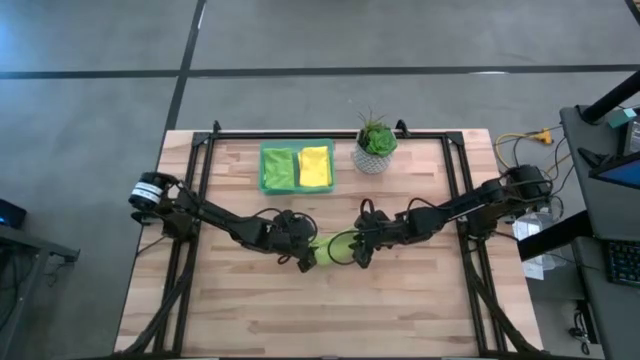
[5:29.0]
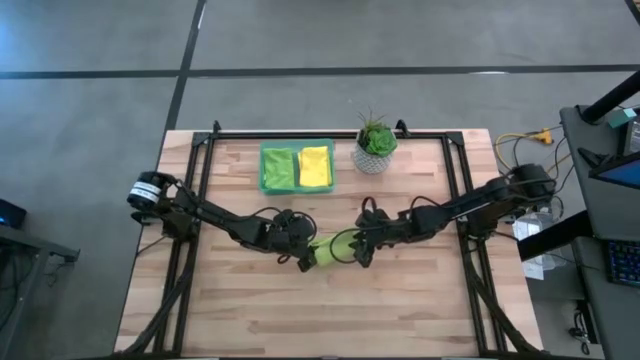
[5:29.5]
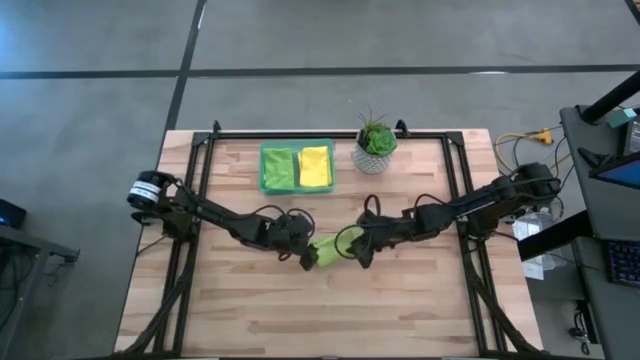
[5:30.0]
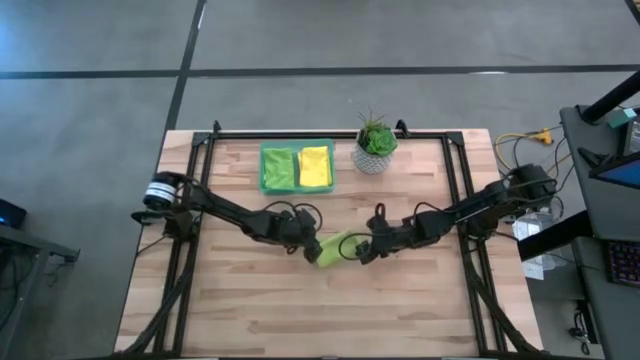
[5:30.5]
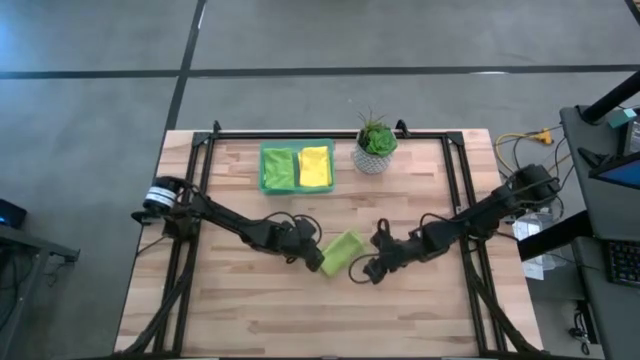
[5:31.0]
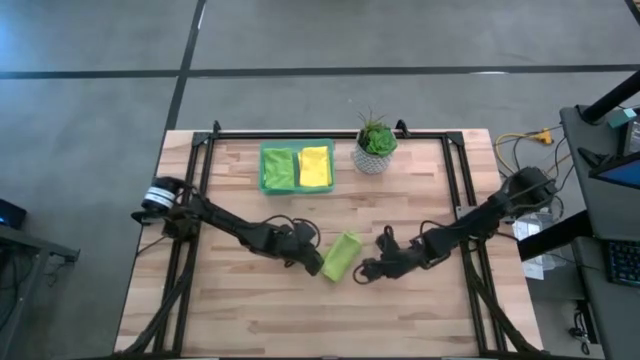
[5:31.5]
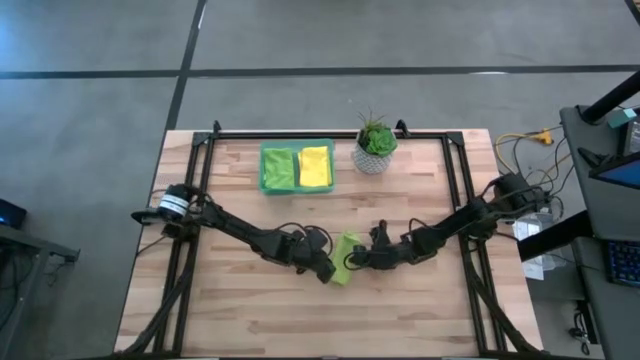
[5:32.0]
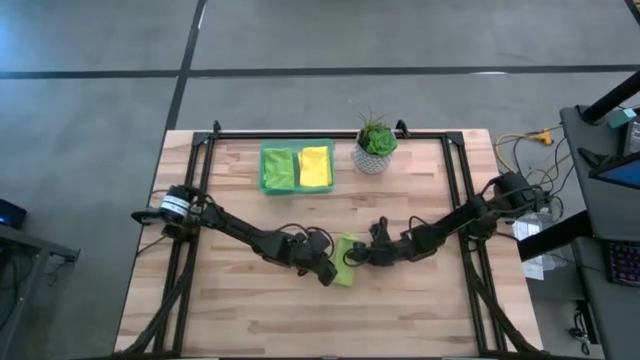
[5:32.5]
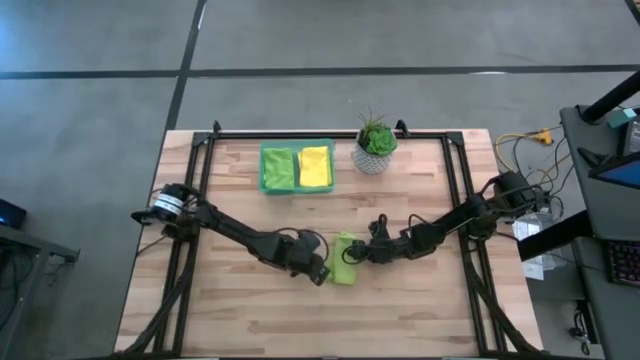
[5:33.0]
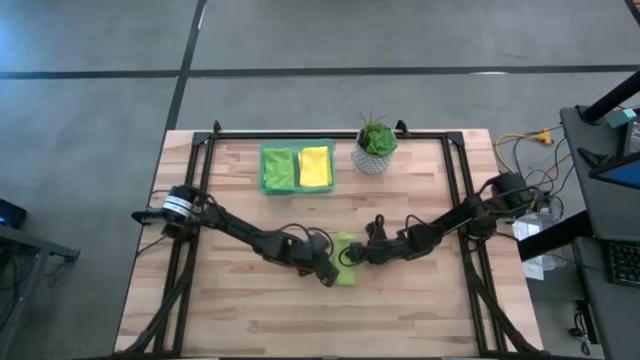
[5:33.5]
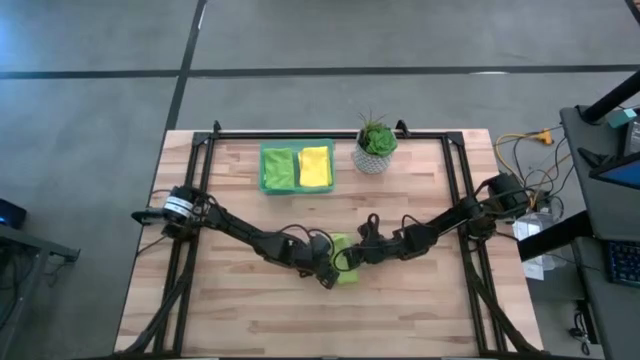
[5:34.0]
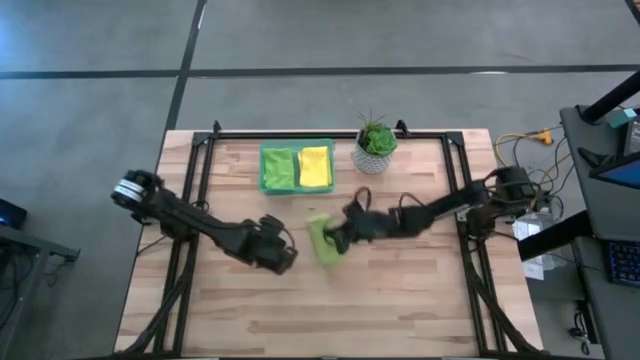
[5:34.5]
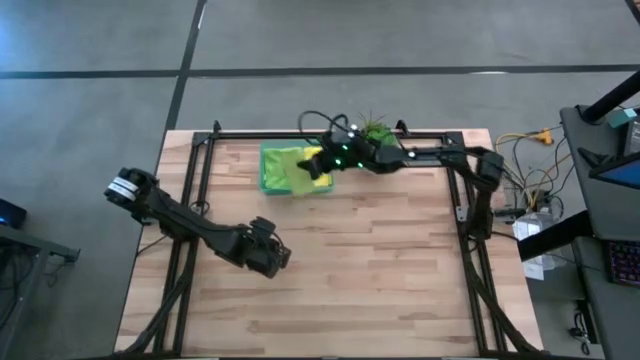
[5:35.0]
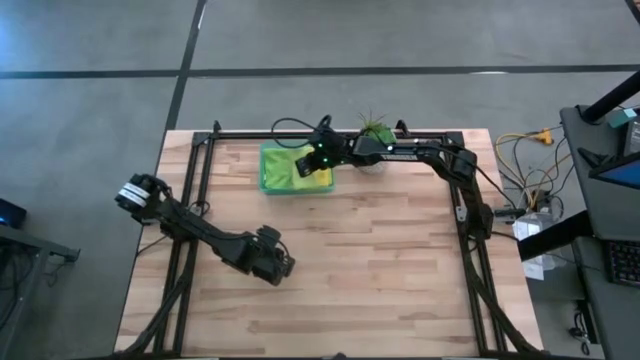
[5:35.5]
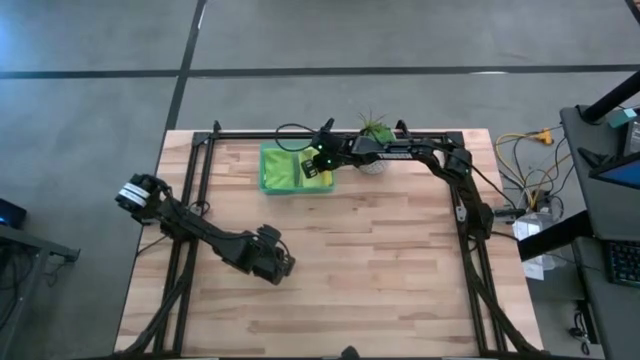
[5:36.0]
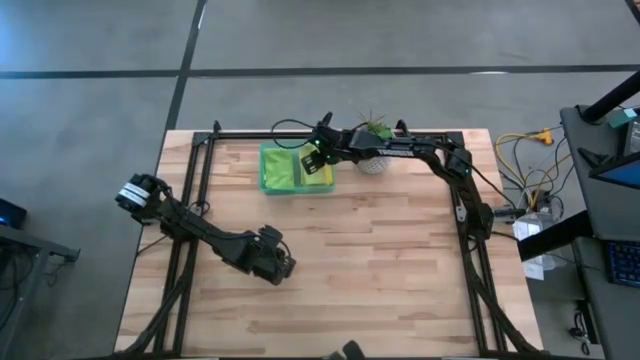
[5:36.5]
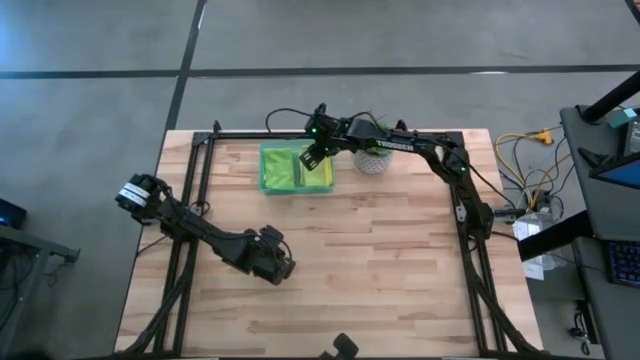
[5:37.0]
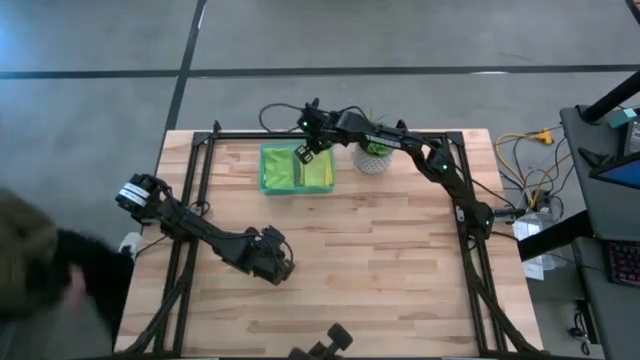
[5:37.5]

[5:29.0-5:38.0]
Task: Fold microfiber towels
Put the folded light green microfiber towel into the light blue bin

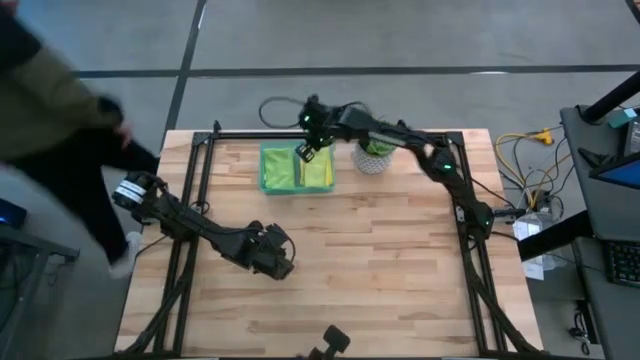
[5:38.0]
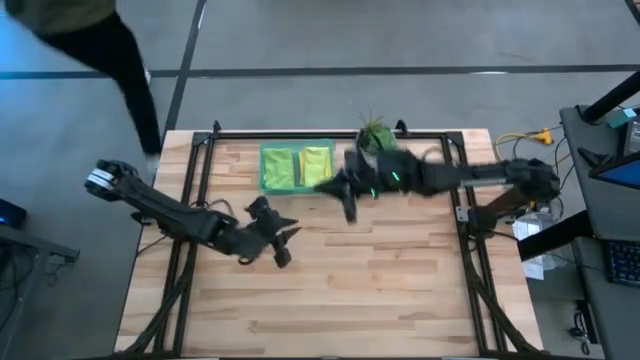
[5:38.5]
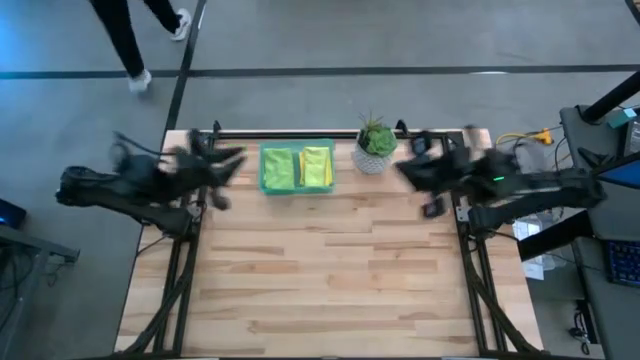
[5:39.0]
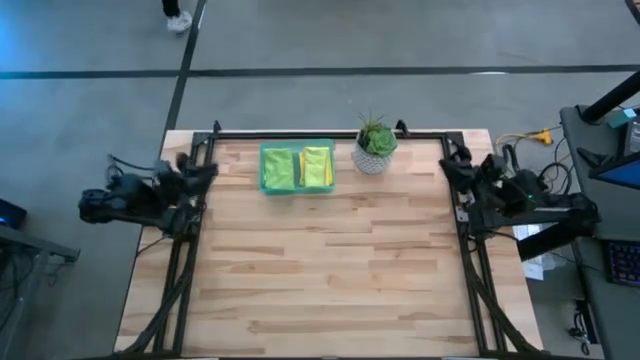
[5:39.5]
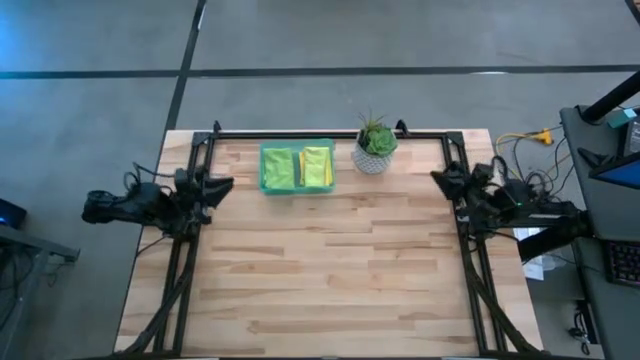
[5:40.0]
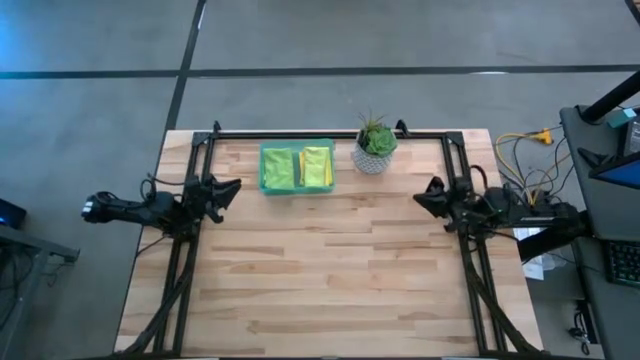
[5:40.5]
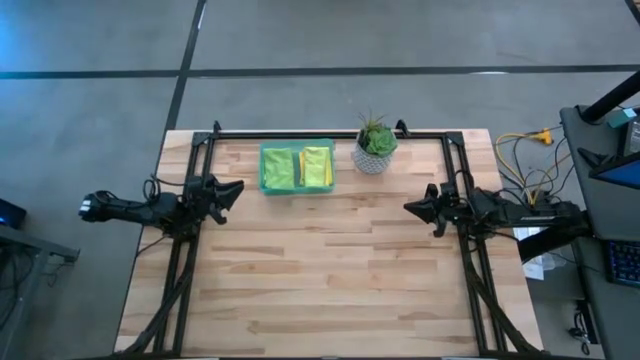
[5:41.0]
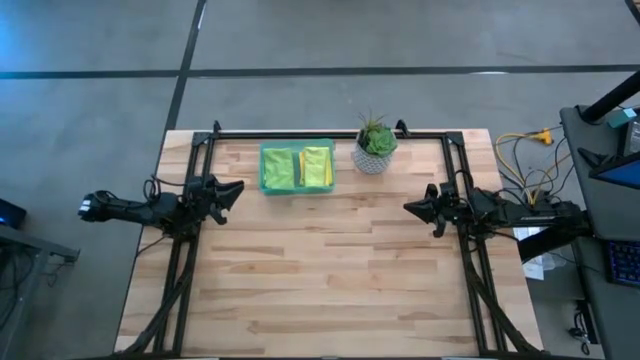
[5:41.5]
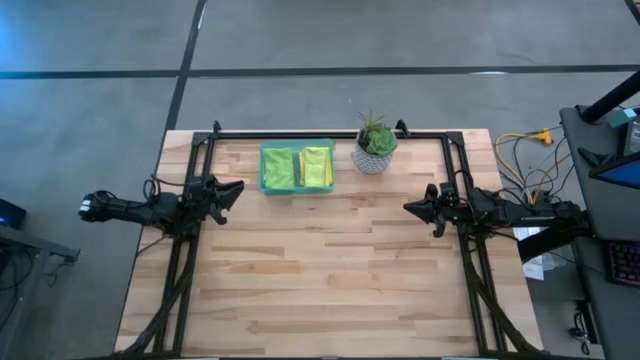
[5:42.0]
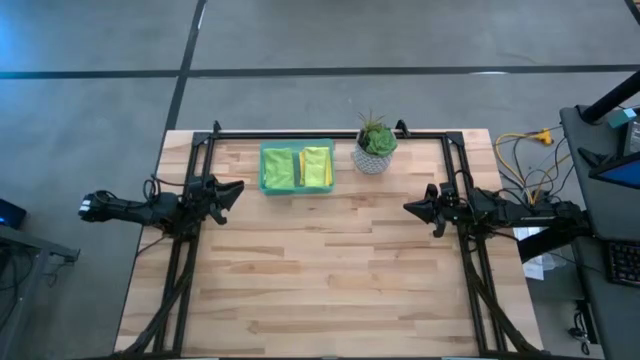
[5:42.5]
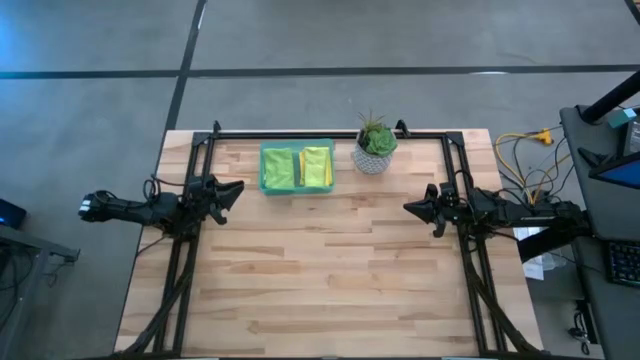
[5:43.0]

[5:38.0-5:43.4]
Return to Home Position

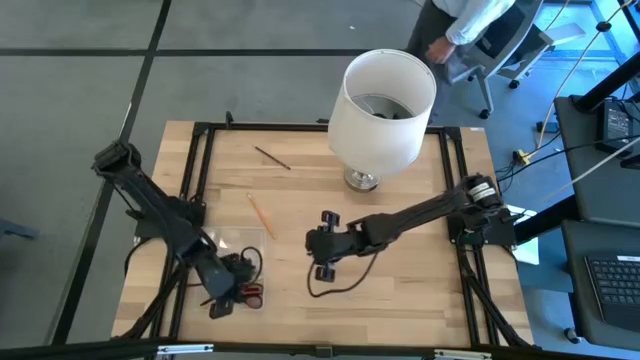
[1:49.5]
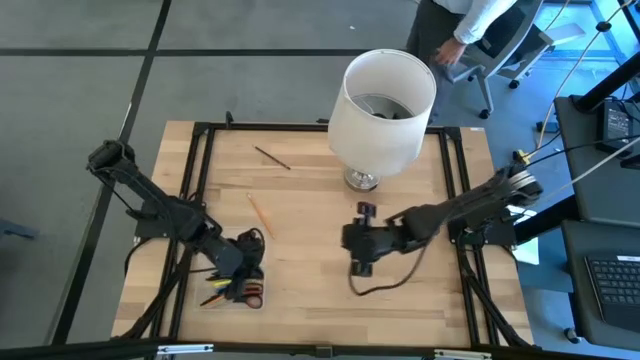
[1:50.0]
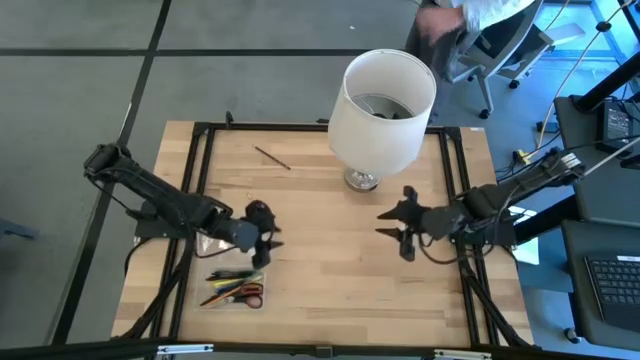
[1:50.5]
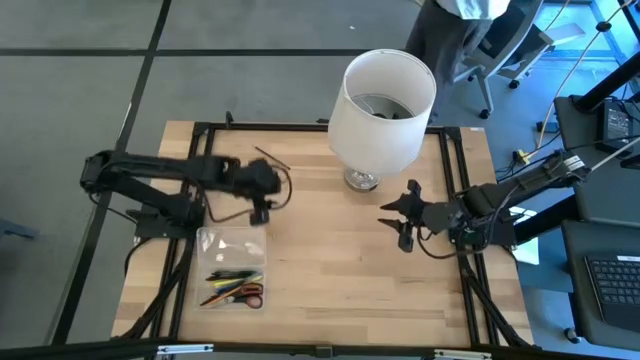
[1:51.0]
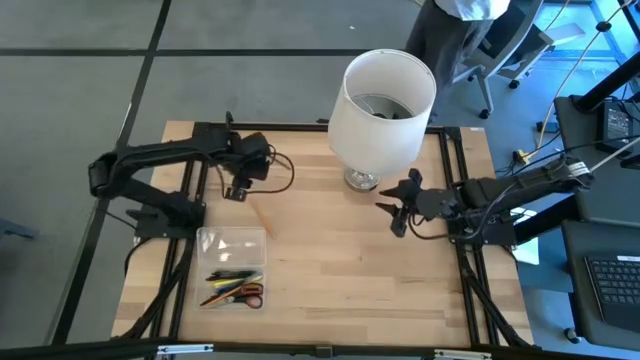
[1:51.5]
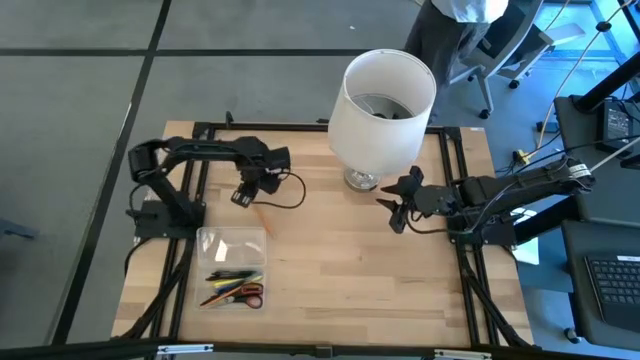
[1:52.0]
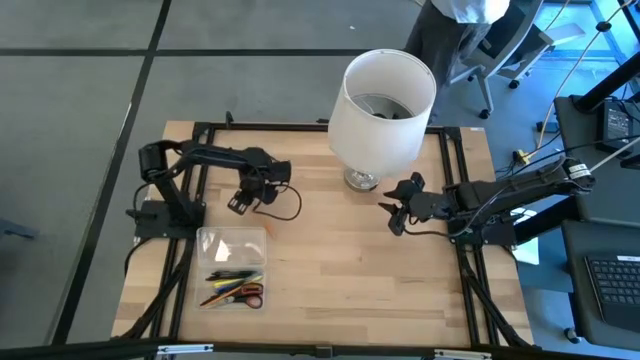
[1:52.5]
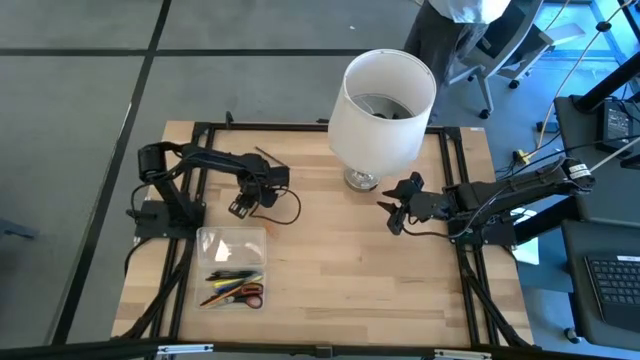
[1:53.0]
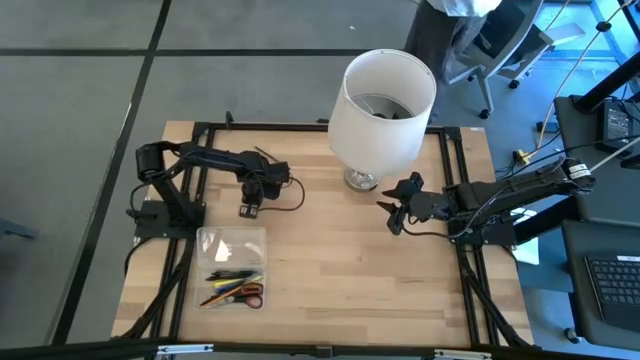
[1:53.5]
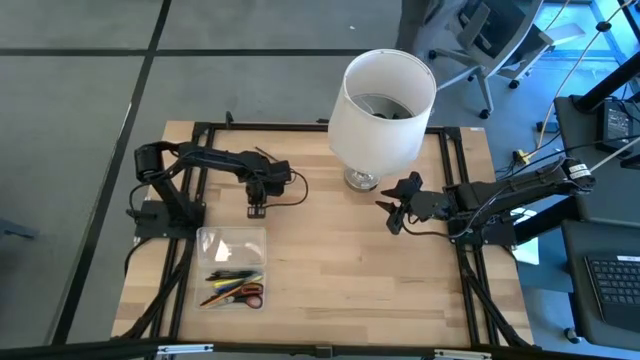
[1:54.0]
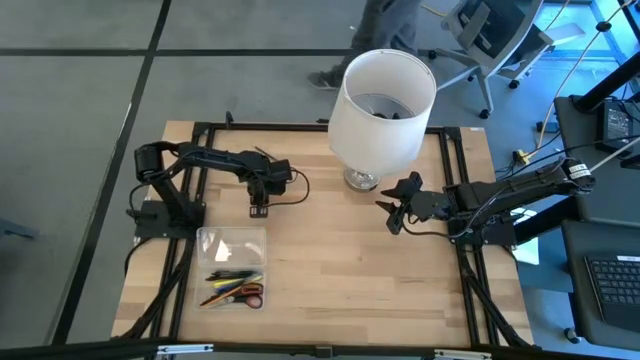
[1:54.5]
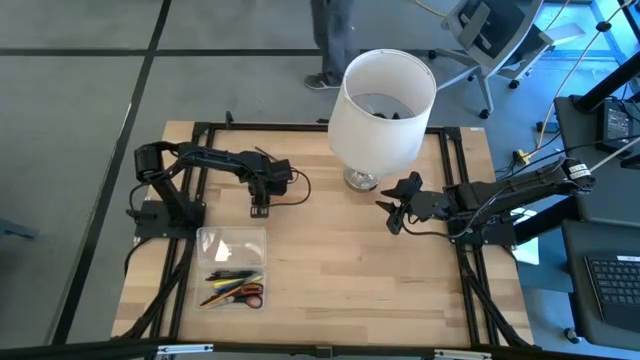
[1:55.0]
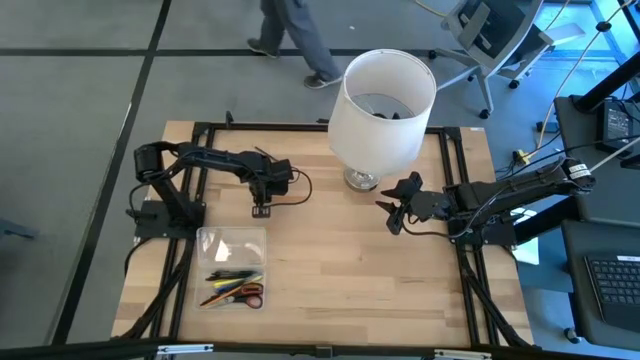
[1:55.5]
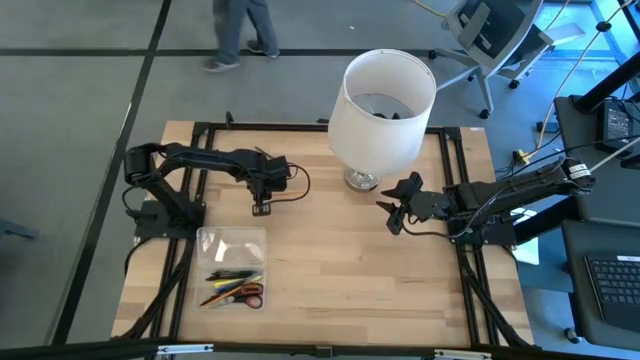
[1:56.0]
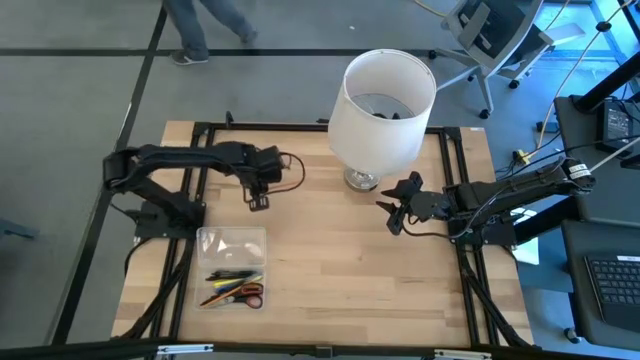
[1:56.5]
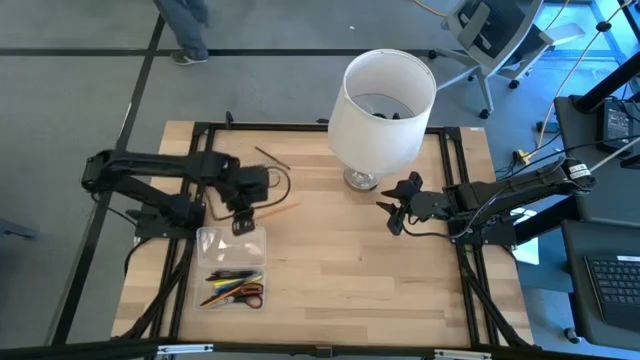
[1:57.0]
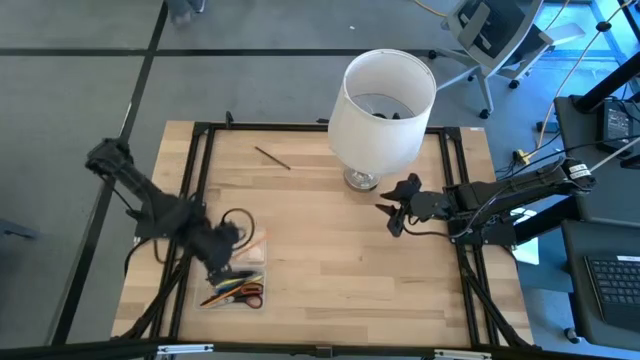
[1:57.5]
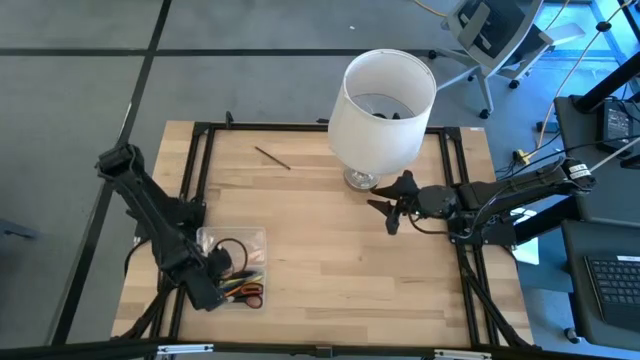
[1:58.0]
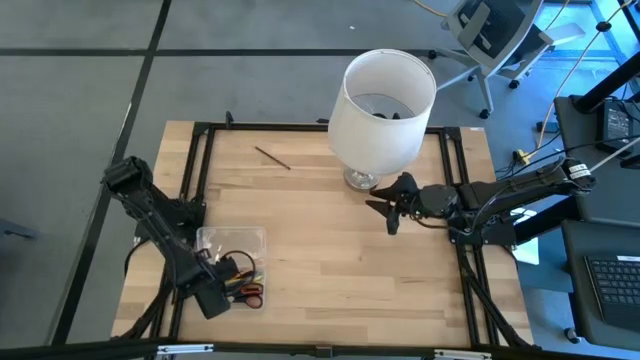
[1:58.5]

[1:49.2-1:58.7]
Task: Pick & place school supplies into a supply box
Put the yellow pencil into the transparent supply box
